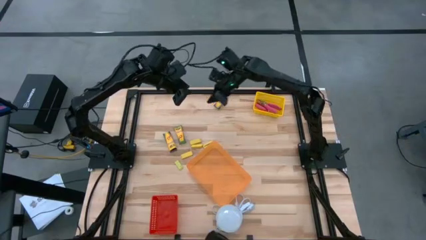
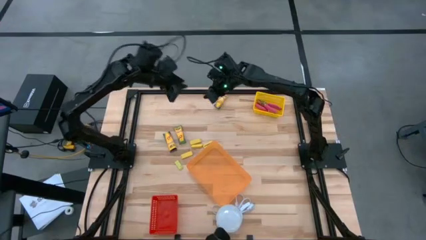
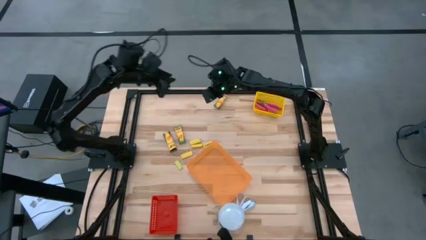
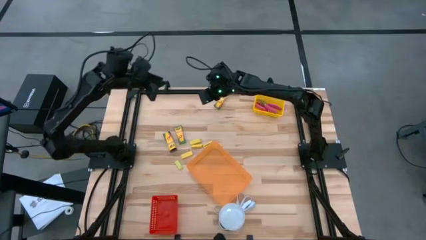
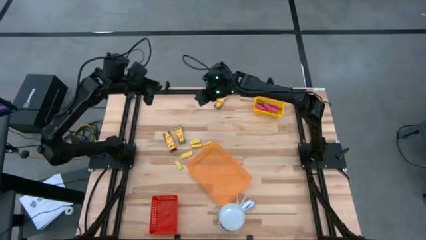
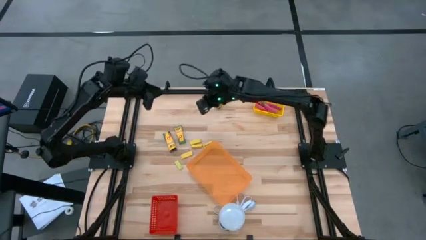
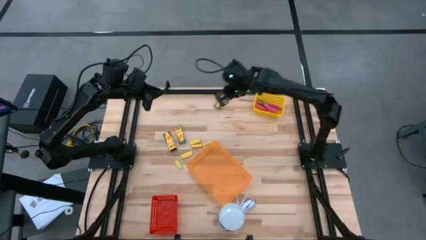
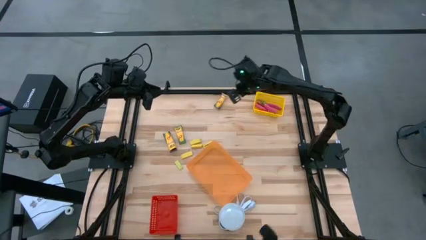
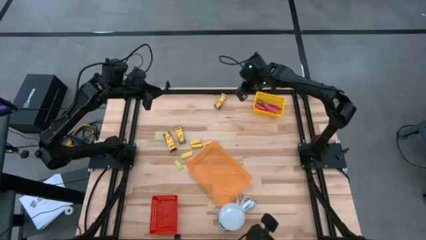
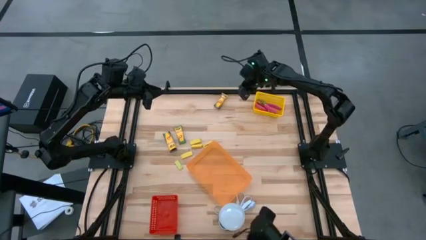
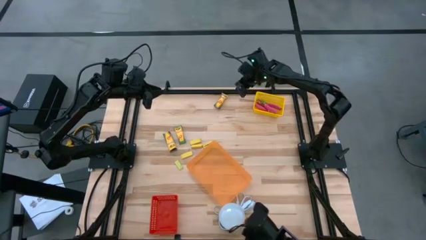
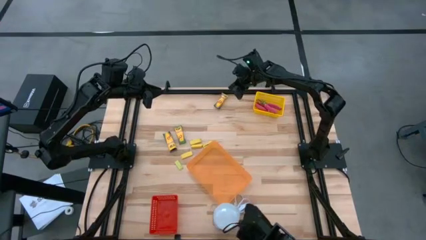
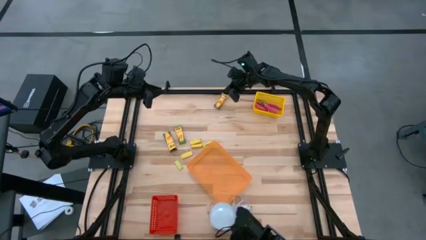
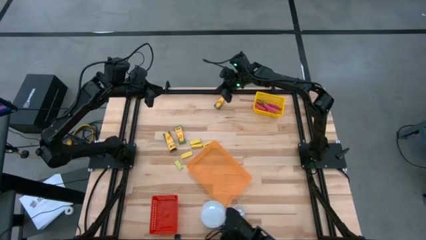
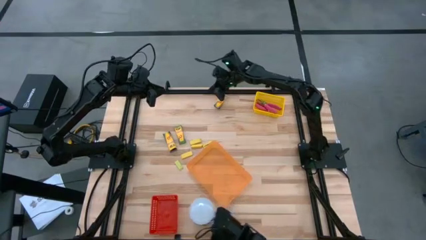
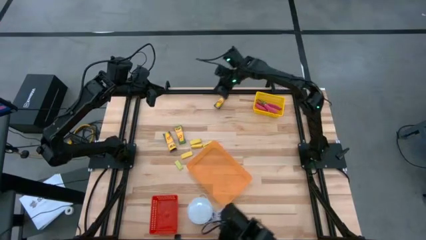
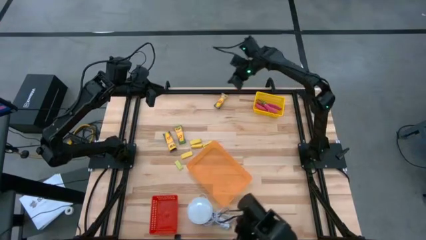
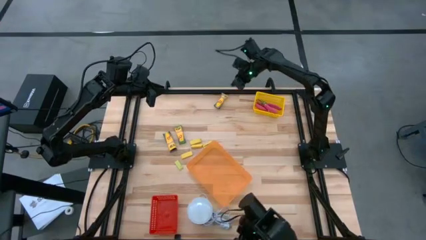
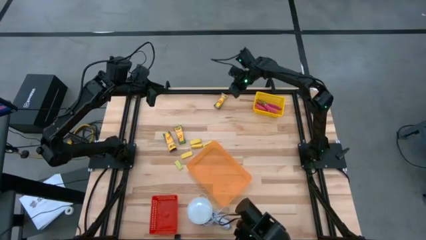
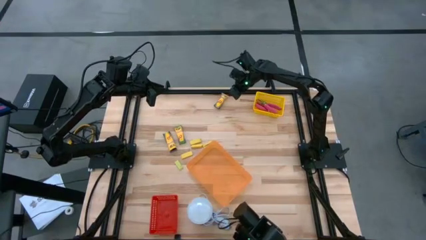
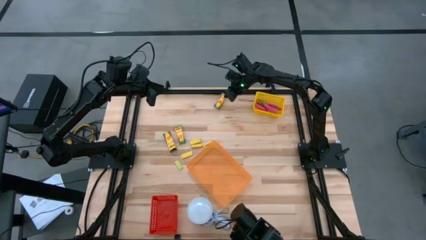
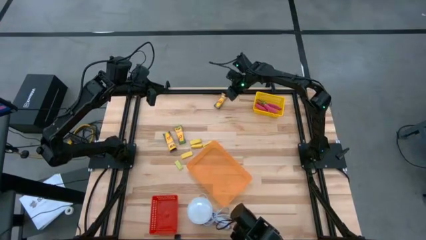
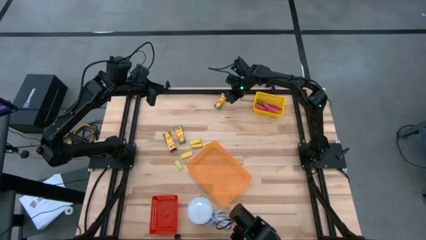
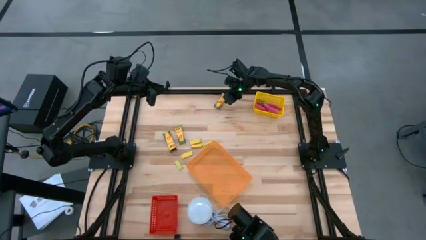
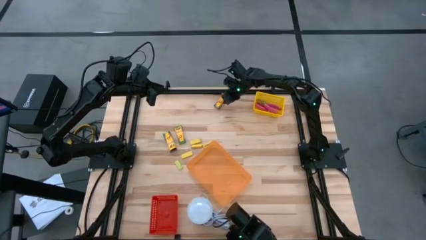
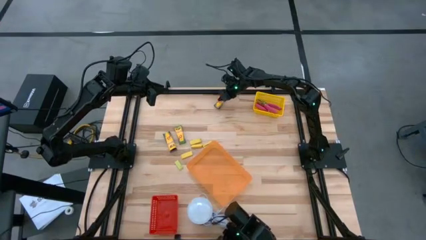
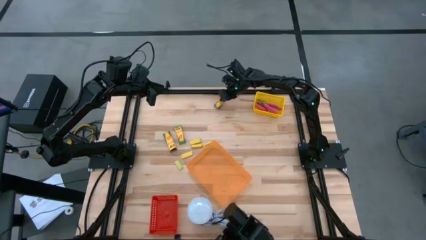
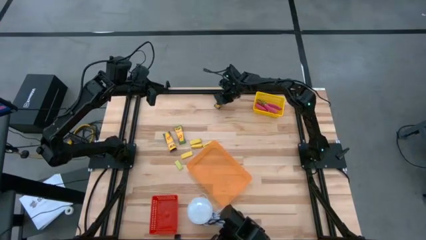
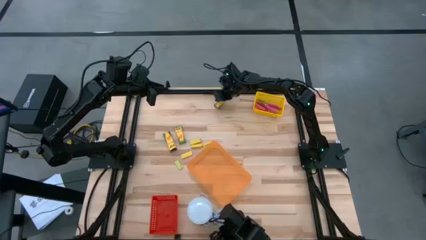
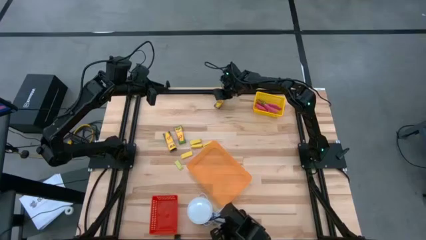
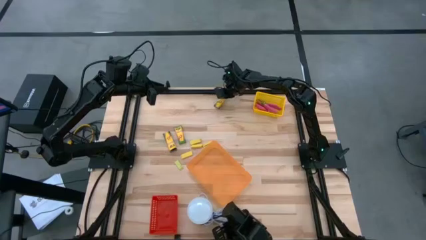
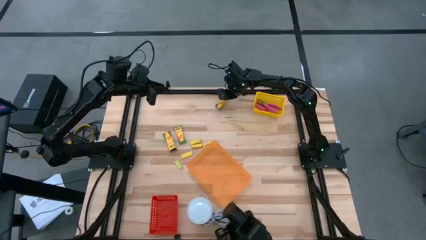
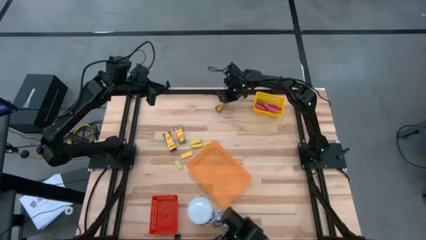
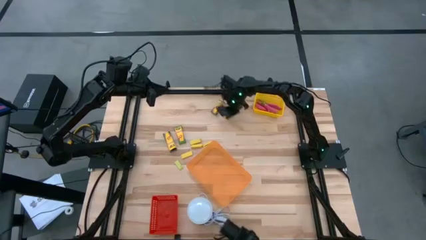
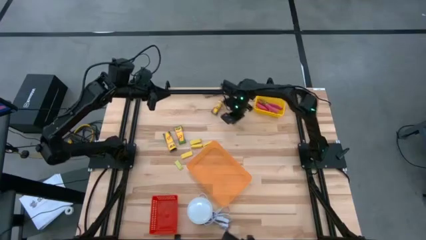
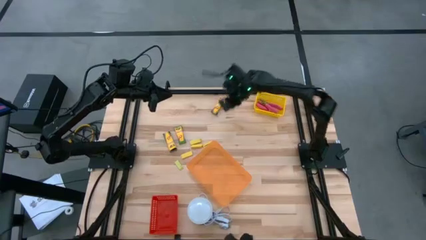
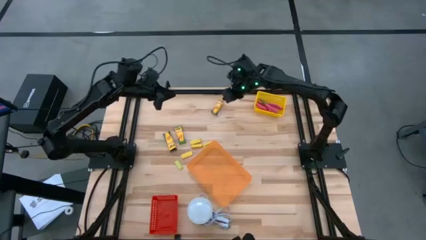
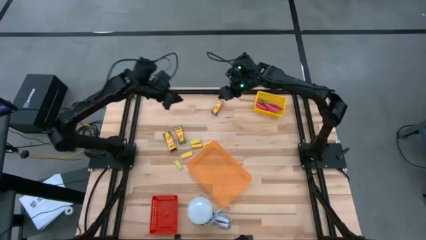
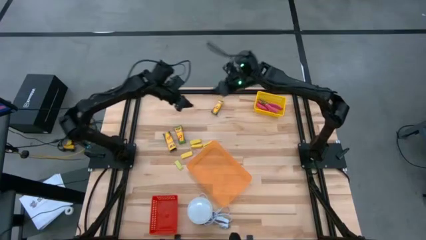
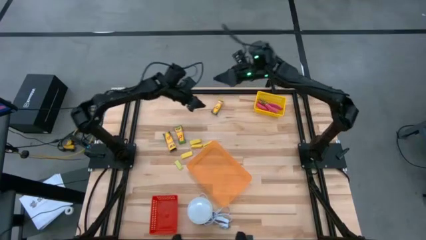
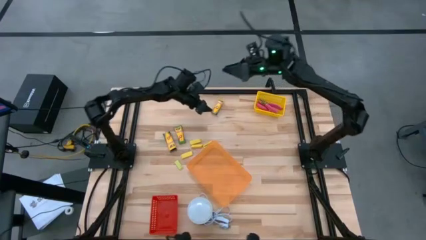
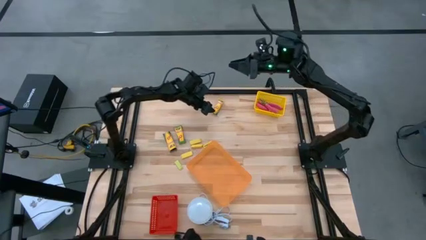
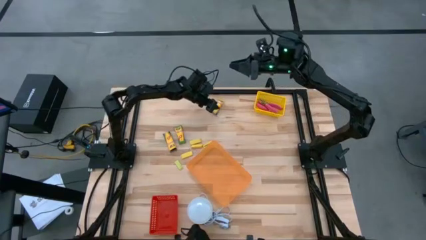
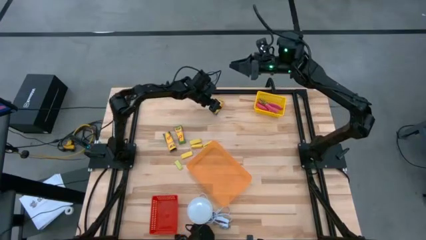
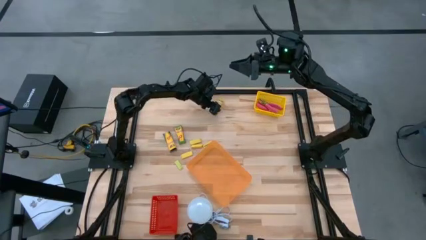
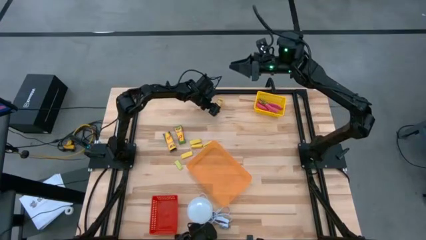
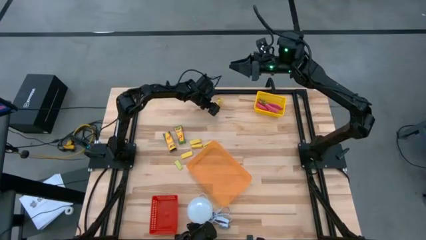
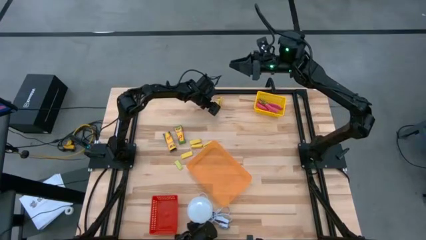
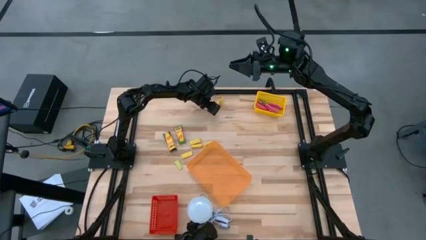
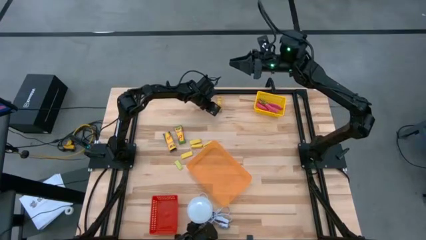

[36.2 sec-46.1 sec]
Task: Pick & Place School Supplies
Put the crayon pack into the orange bin

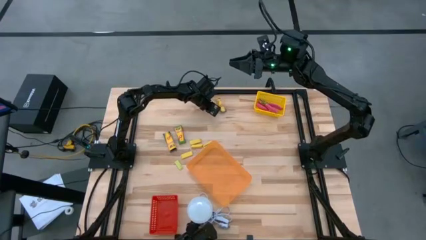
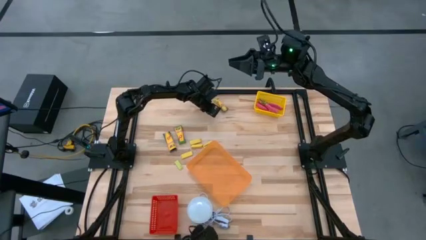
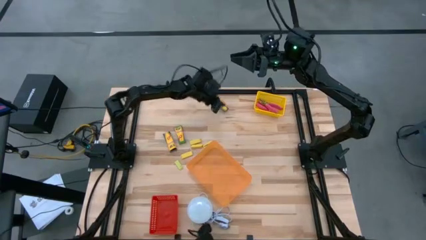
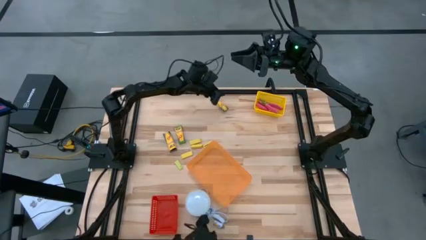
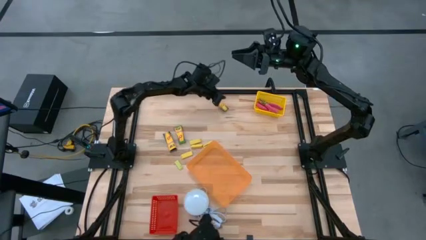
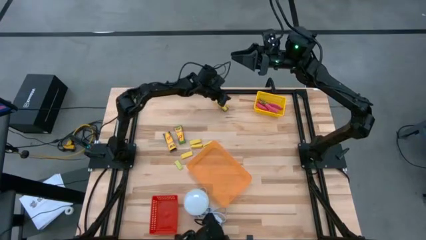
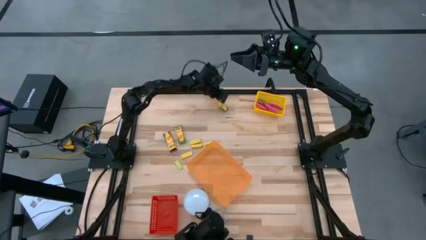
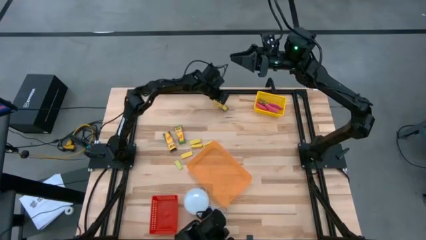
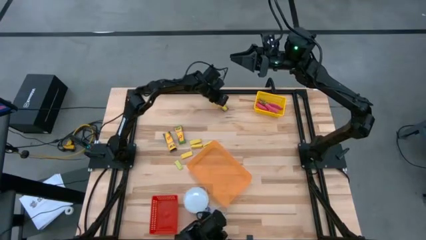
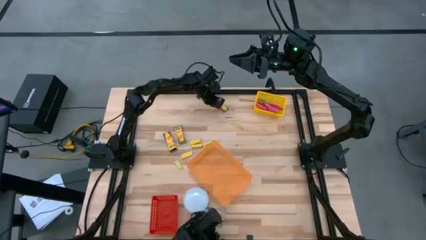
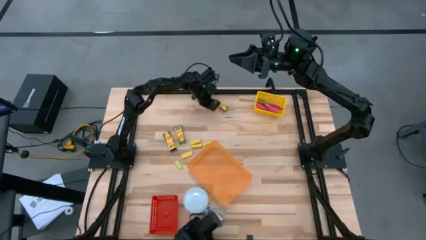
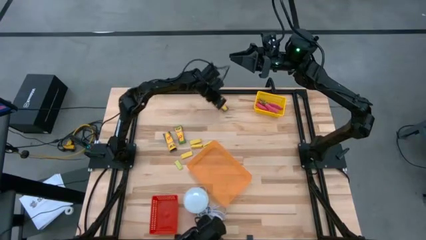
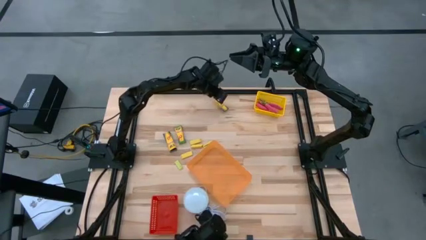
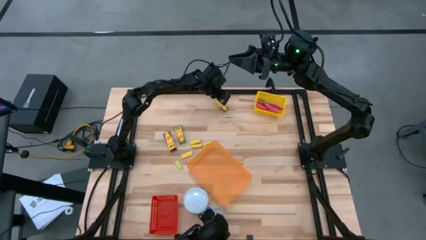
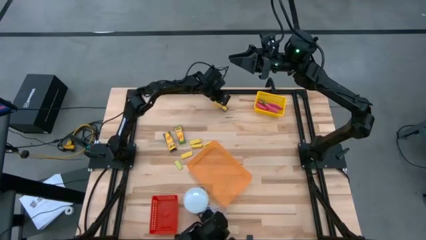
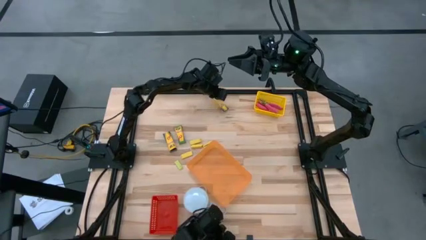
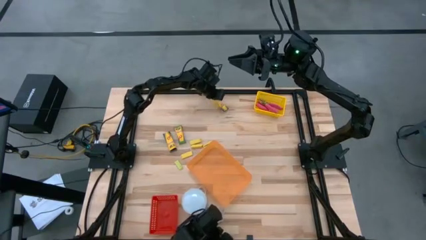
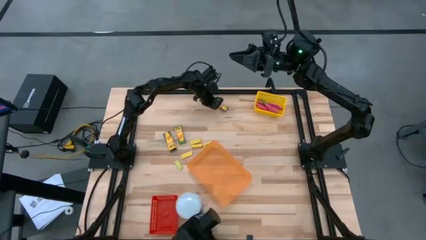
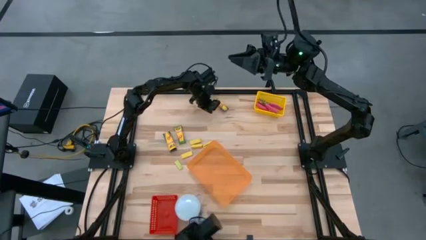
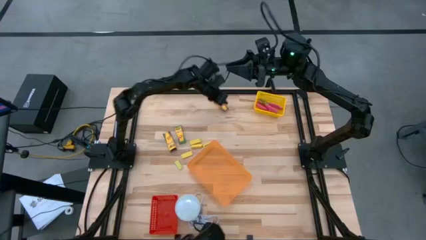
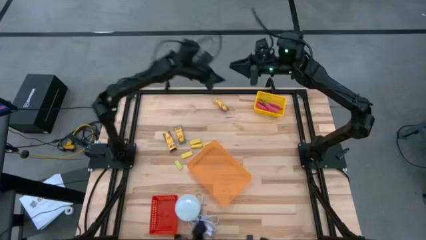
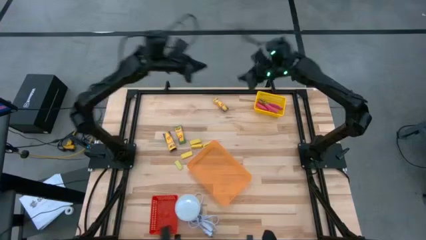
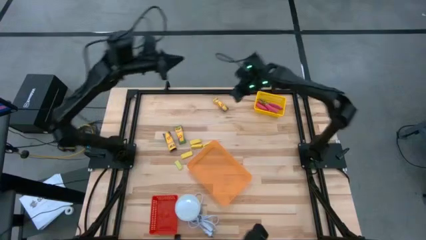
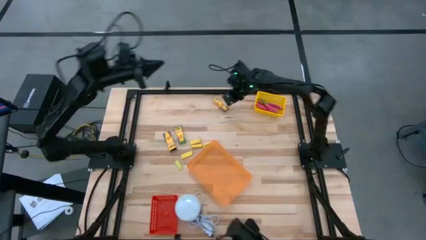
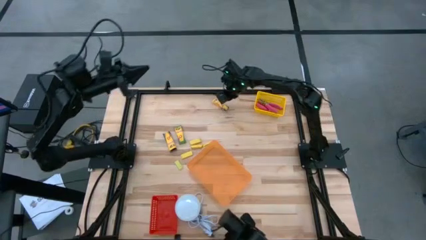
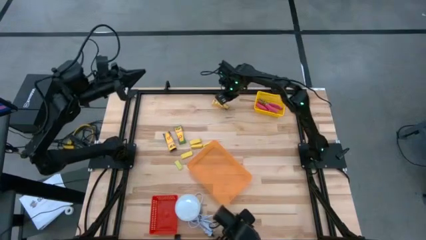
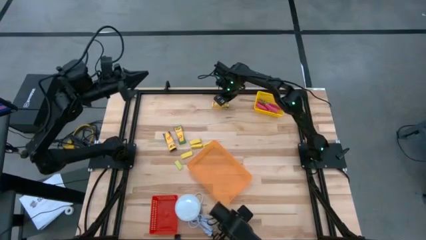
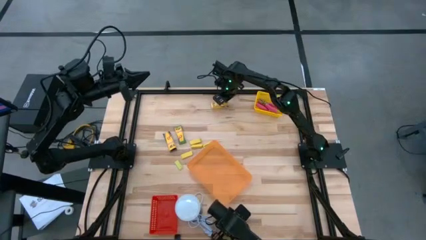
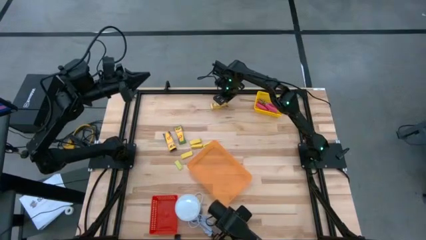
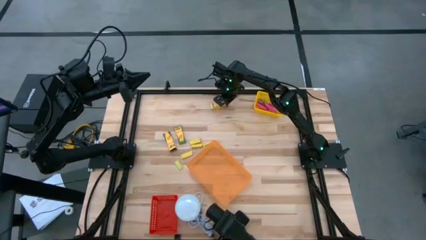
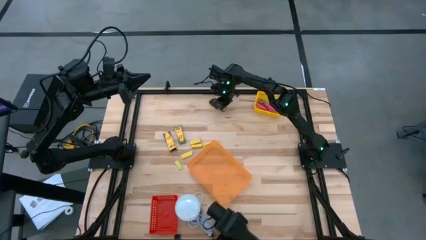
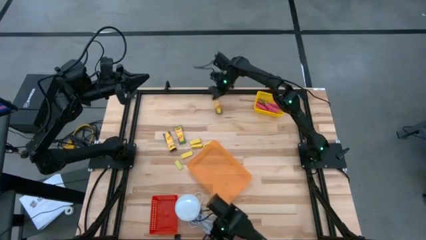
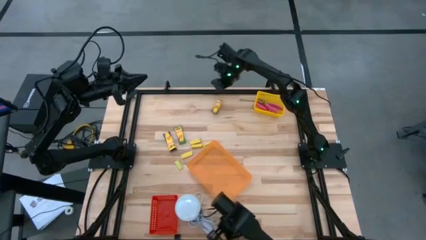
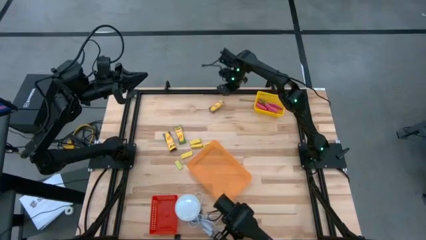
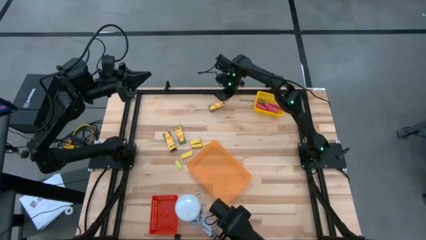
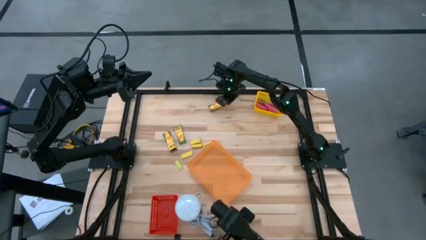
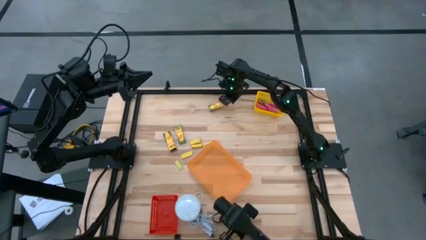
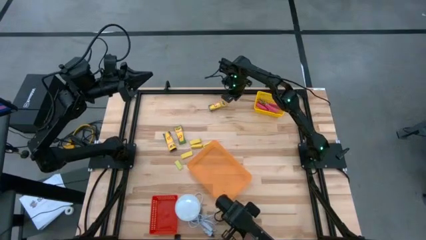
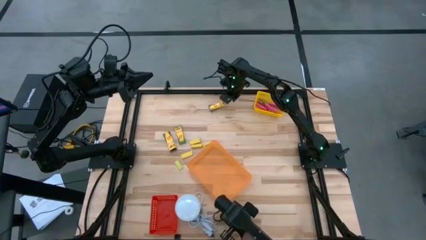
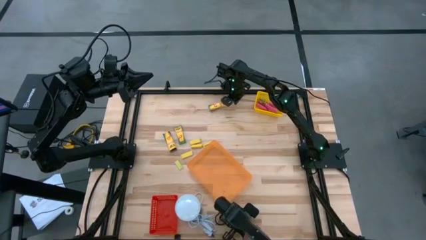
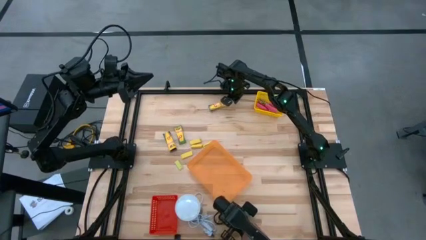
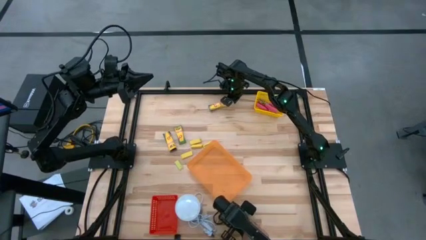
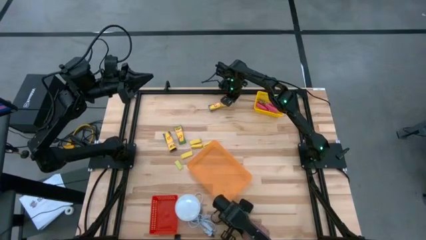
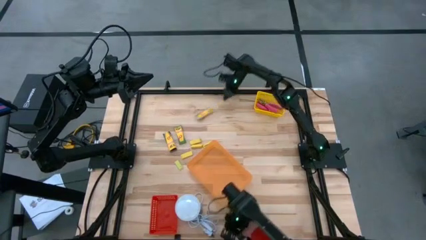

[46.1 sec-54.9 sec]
Move the crayon pack to the middle left of the table
